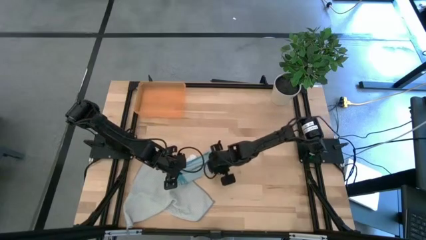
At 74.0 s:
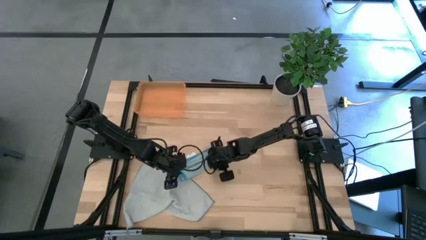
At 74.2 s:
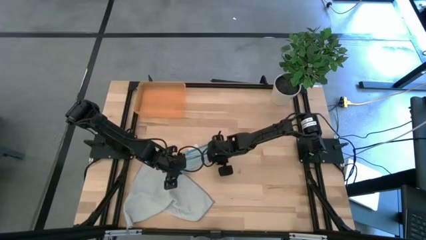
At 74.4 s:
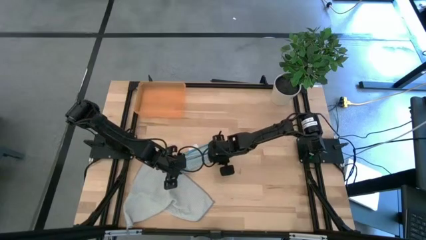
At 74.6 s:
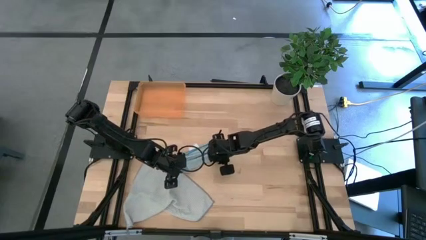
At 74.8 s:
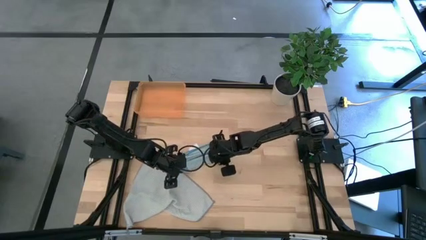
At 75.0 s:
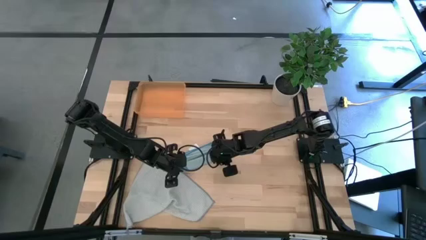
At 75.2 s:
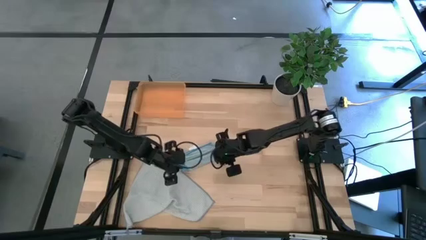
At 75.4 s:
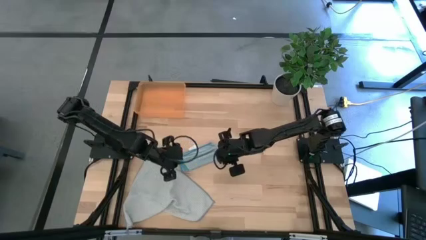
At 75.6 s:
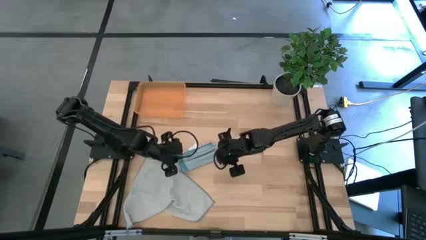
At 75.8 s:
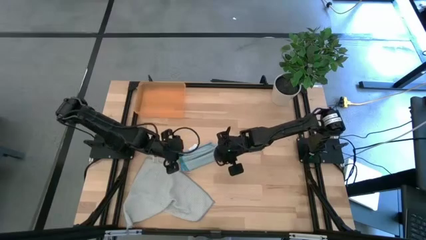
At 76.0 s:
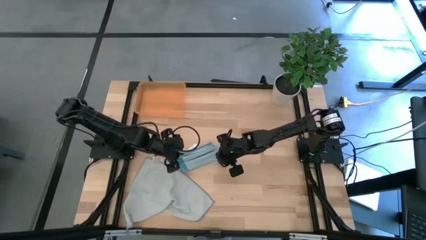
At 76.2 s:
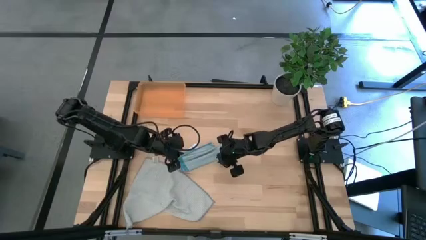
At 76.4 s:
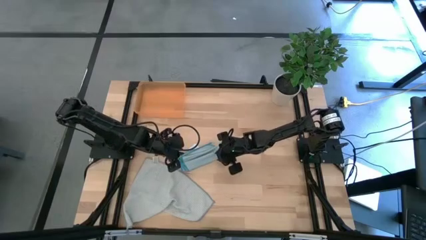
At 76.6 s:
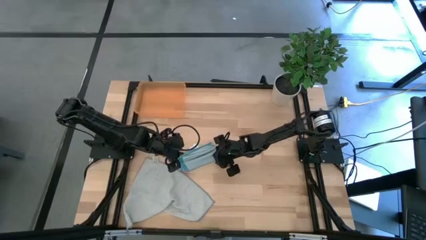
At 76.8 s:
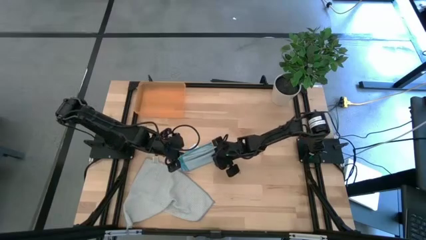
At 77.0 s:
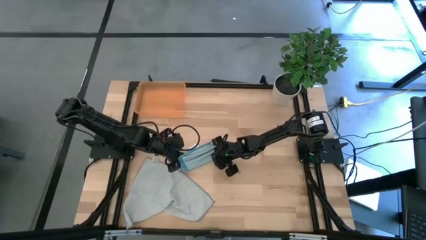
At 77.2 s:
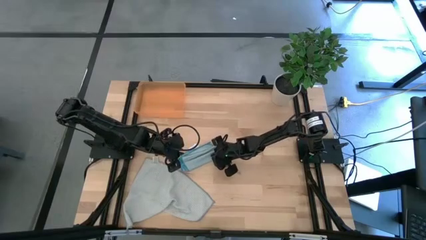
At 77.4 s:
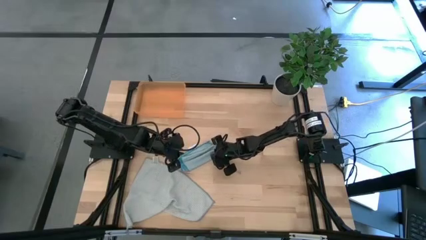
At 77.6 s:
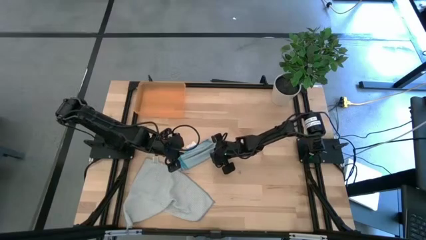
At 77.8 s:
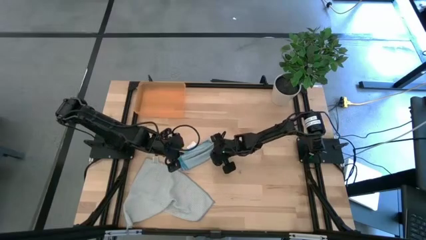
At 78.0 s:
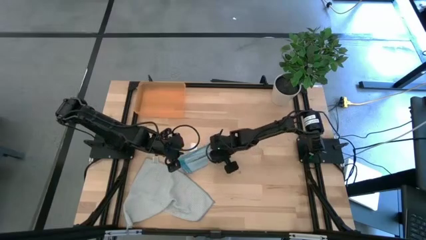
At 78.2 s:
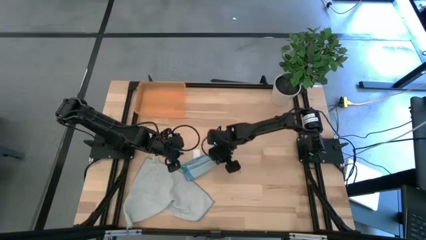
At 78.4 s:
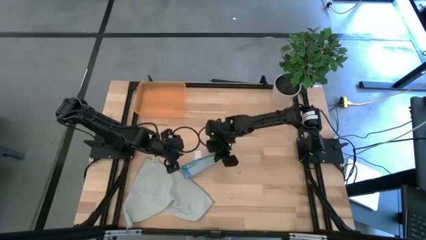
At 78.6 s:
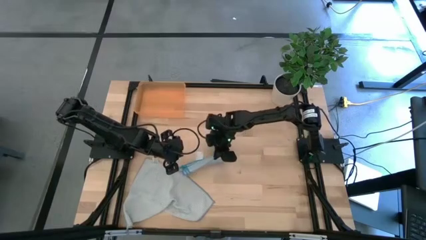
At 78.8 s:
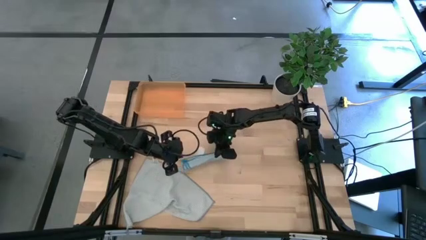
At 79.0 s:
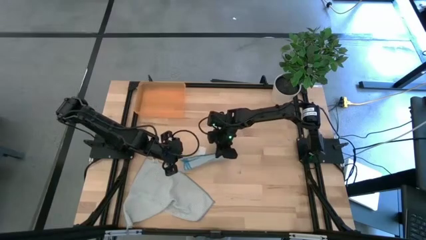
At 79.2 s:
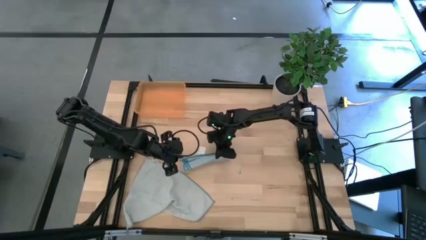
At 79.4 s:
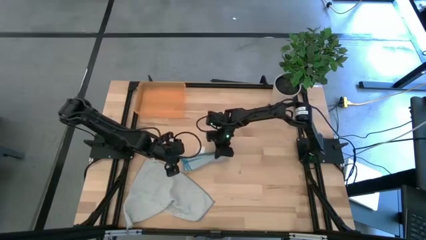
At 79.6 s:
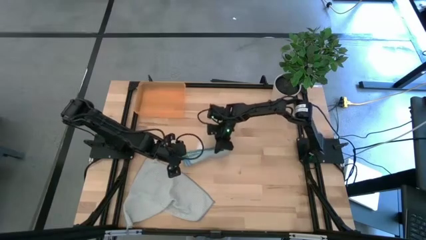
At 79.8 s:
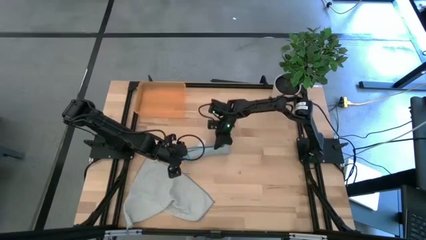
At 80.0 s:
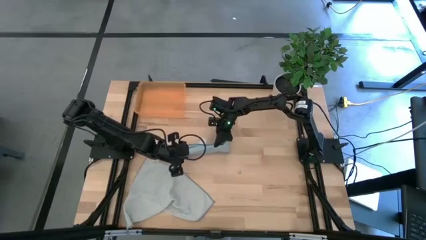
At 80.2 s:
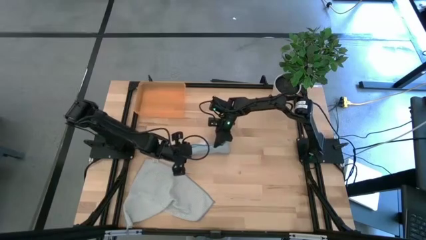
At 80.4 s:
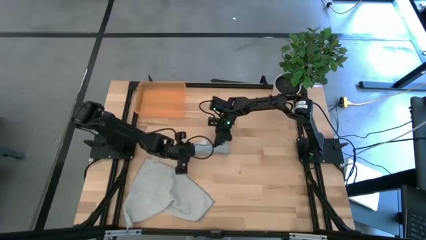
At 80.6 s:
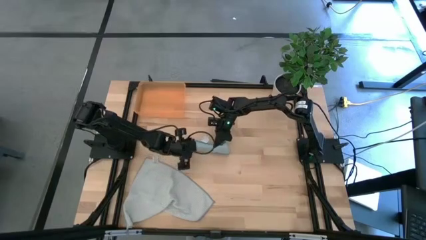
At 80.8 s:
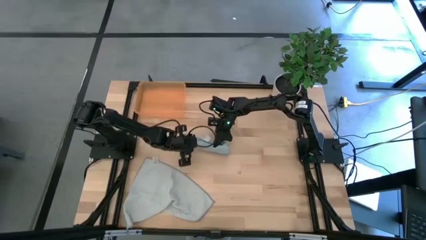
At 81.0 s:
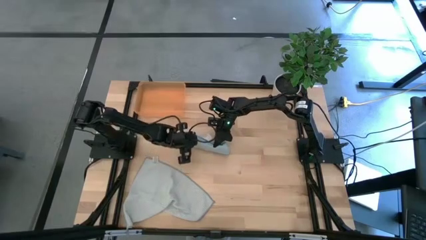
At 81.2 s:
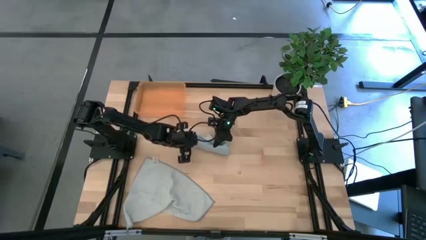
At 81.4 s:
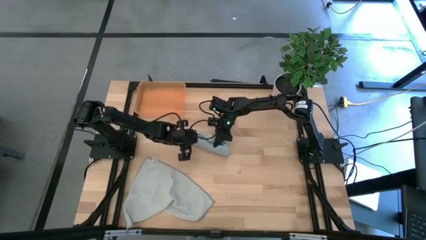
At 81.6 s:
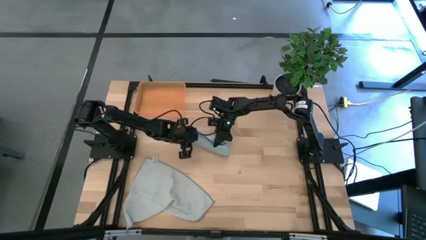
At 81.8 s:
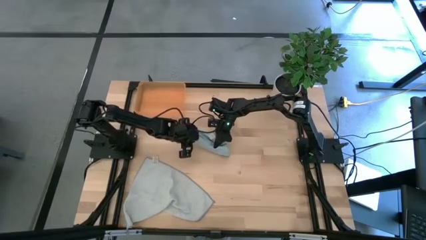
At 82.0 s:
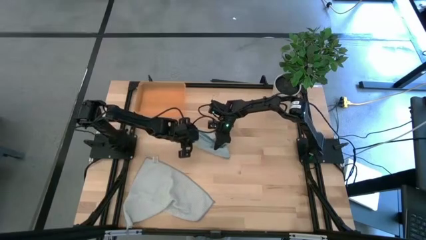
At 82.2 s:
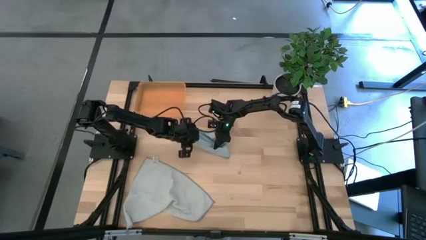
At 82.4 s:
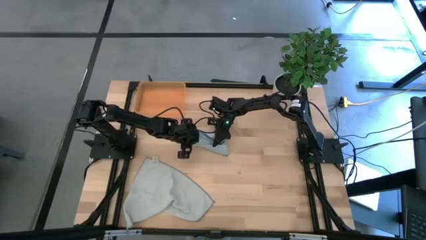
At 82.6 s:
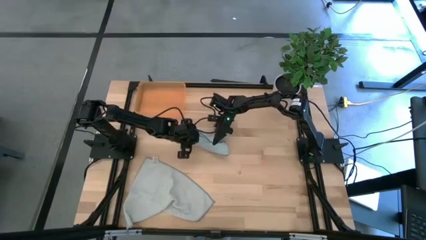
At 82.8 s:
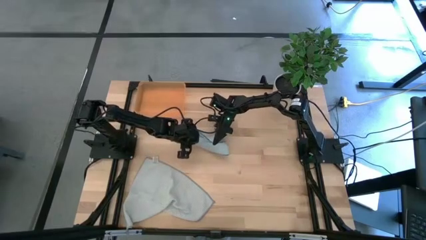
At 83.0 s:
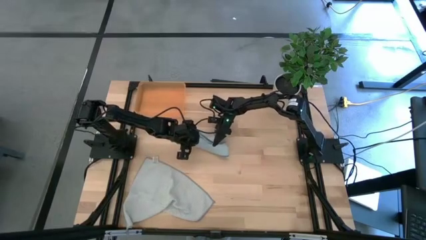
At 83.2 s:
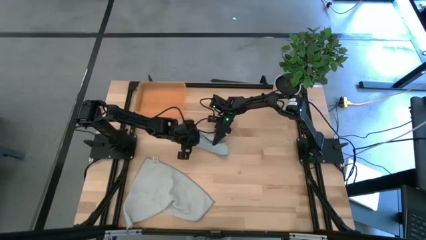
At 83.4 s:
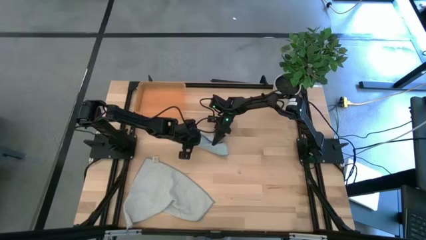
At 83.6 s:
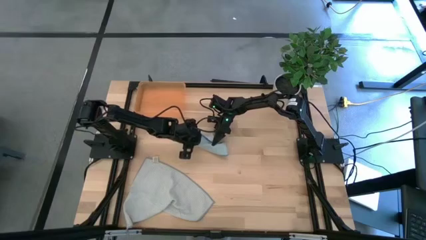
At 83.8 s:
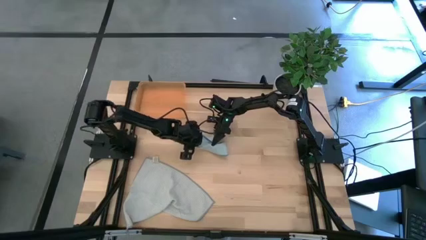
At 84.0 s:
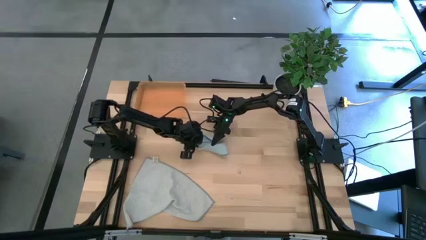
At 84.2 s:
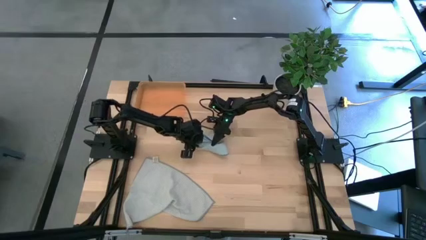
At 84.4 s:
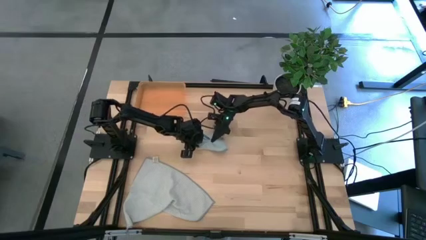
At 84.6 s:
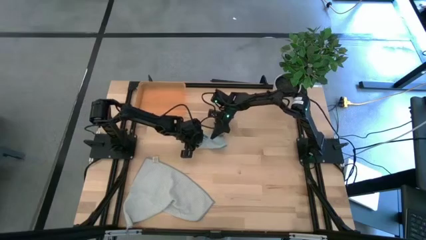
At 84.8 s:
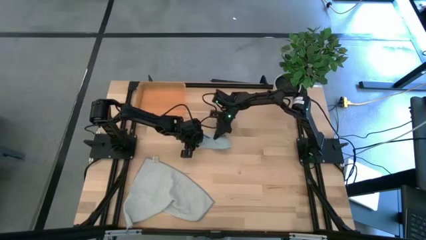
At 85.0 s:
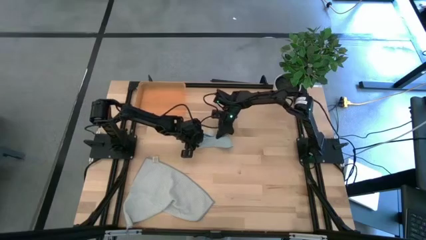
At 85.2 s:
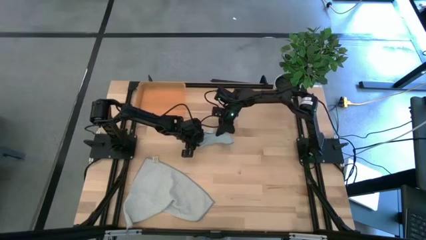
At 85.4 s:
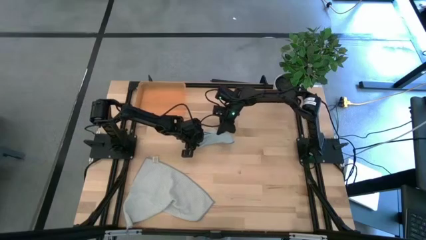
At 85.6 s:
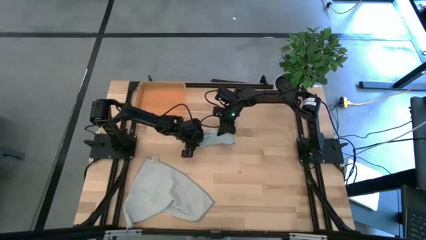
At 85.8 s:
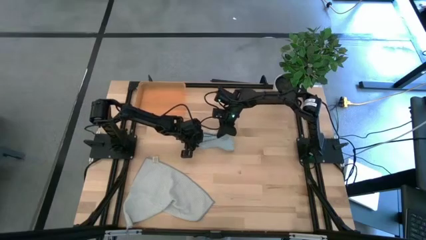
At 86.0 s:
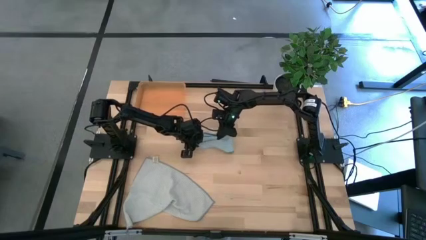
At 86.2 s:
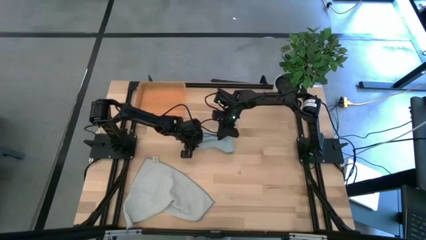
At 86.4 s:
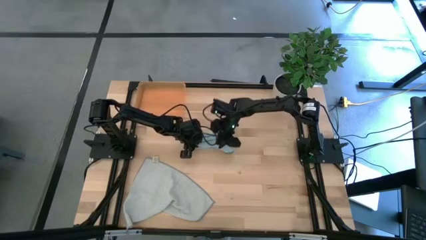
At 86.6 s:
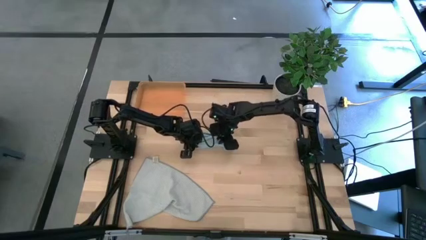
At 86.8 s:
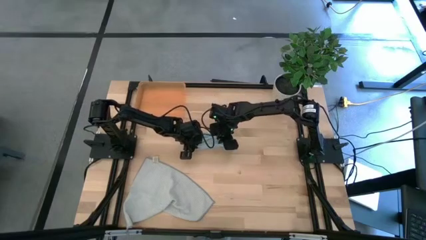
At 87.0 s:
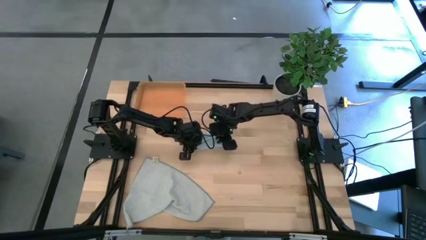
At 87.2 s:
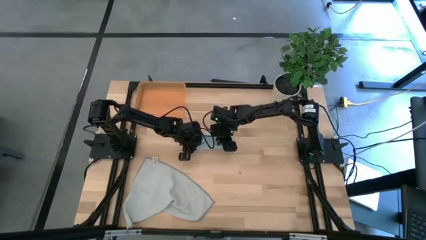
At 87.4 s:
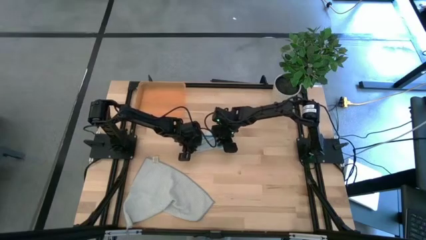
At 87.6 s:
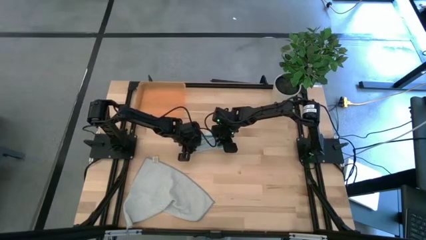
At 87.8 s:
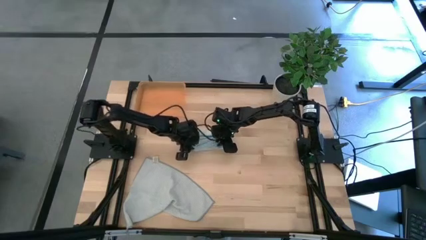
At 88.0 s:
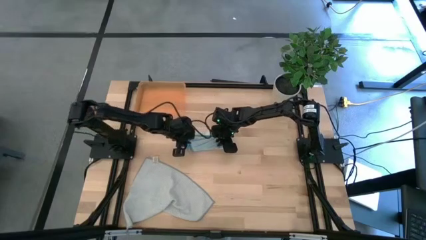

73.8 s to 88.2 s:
Task: Roll microfiber towels into tight, uniform cylinder then place into a basket
Roll the blue microfiber cloth
